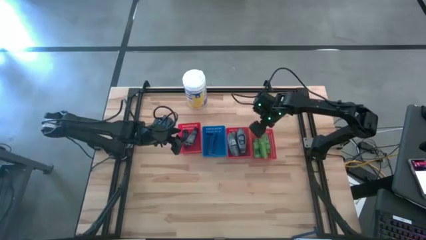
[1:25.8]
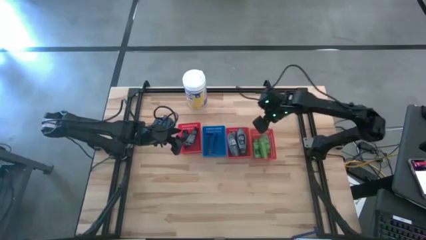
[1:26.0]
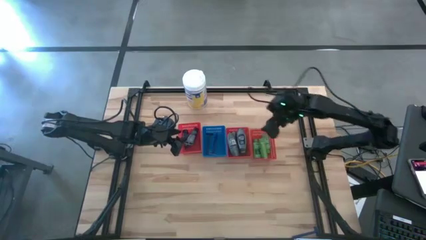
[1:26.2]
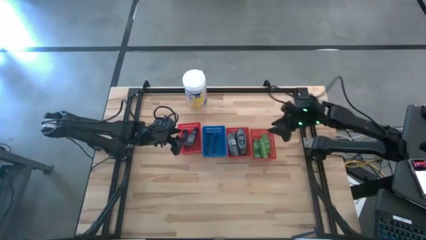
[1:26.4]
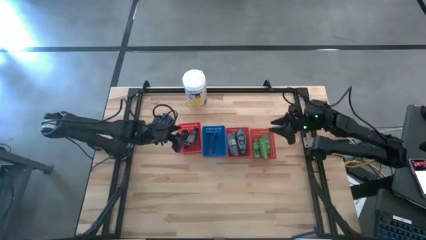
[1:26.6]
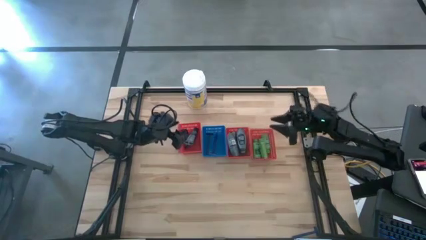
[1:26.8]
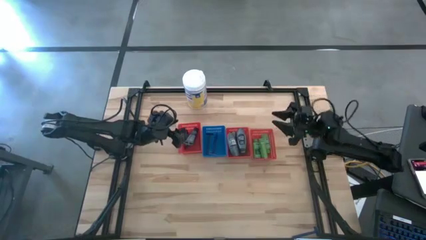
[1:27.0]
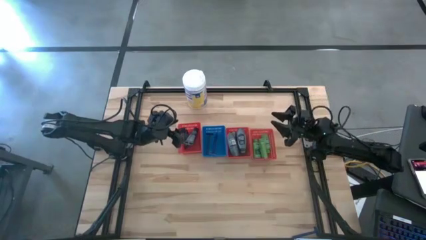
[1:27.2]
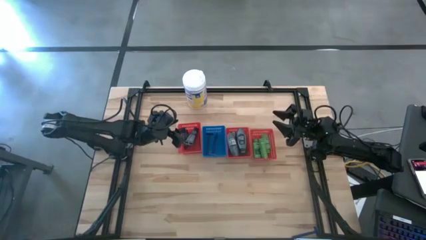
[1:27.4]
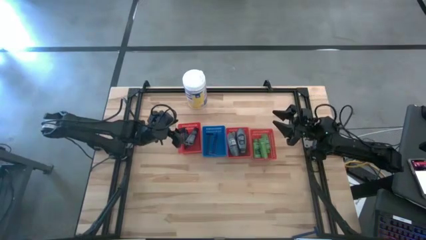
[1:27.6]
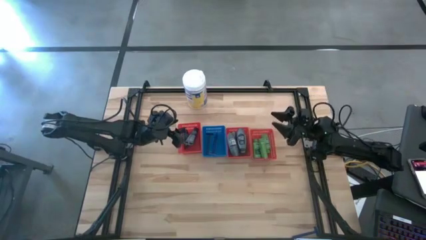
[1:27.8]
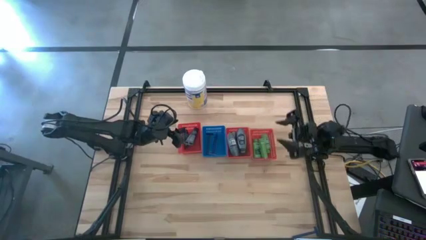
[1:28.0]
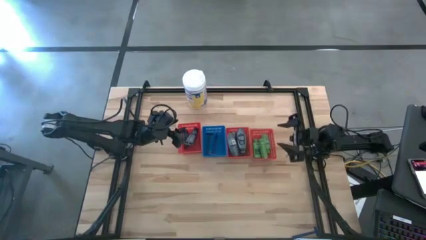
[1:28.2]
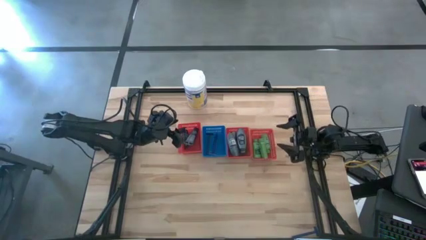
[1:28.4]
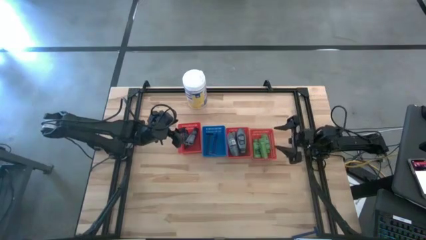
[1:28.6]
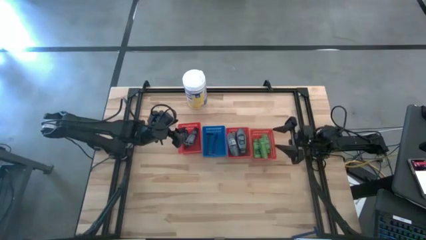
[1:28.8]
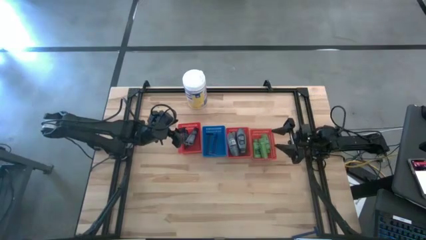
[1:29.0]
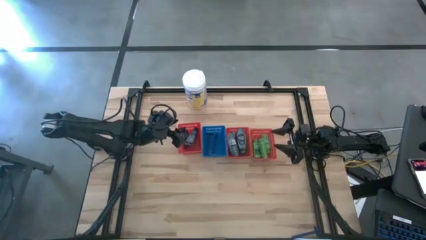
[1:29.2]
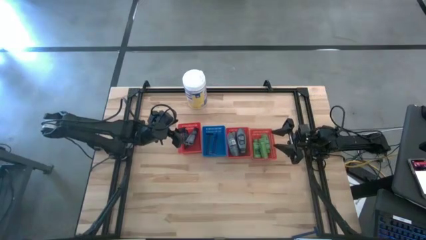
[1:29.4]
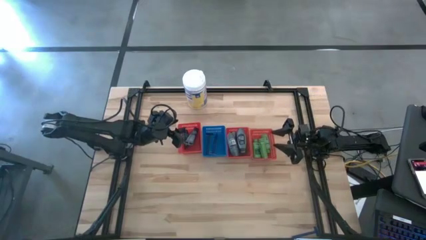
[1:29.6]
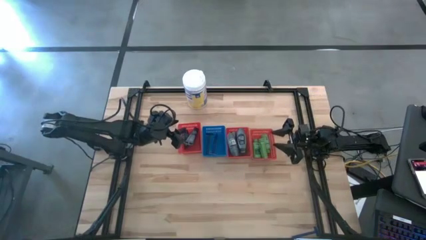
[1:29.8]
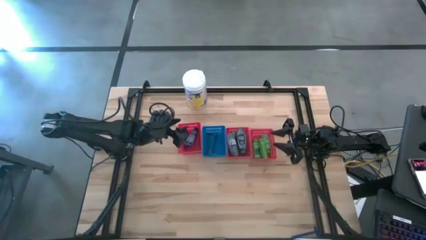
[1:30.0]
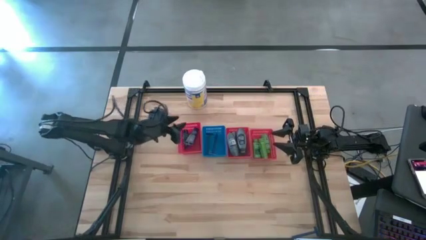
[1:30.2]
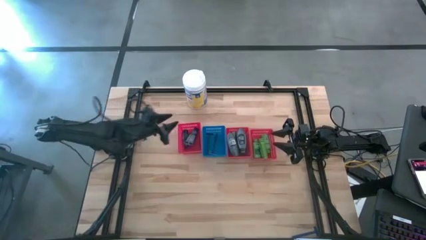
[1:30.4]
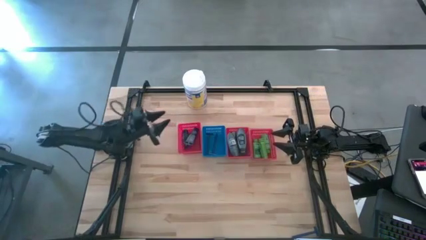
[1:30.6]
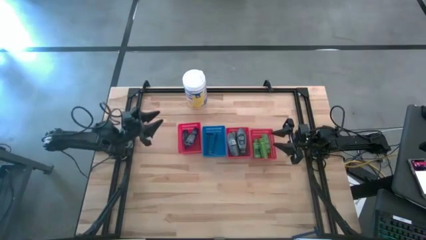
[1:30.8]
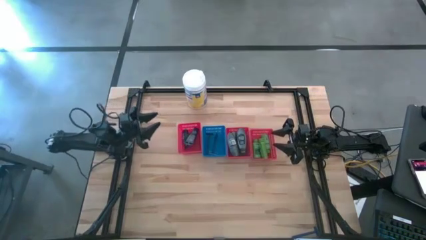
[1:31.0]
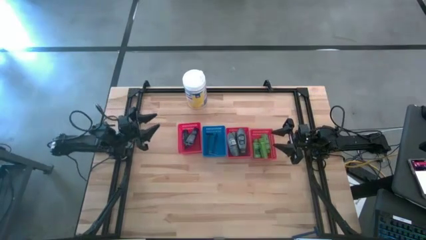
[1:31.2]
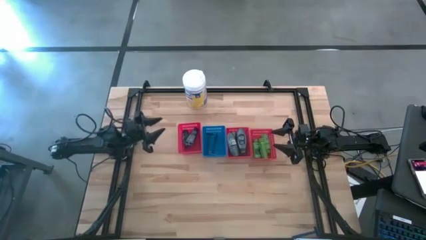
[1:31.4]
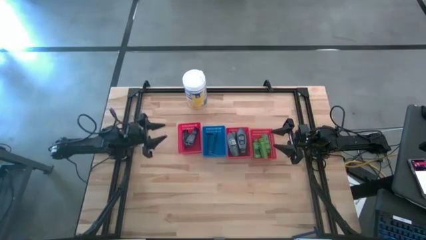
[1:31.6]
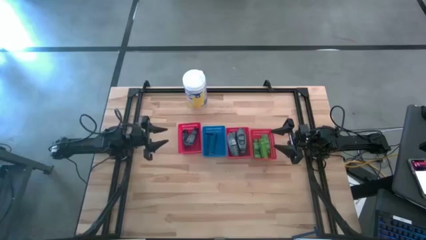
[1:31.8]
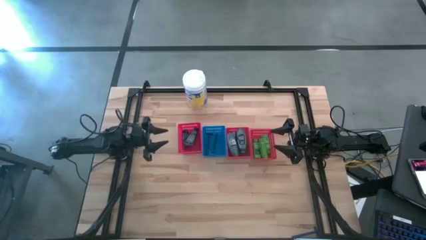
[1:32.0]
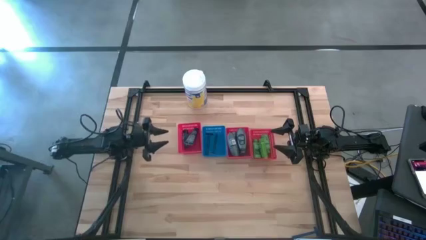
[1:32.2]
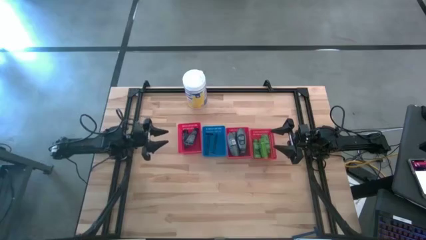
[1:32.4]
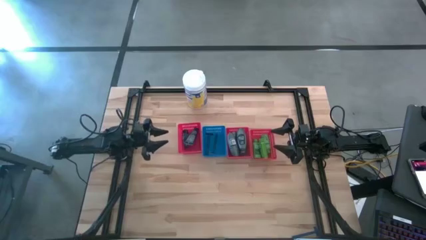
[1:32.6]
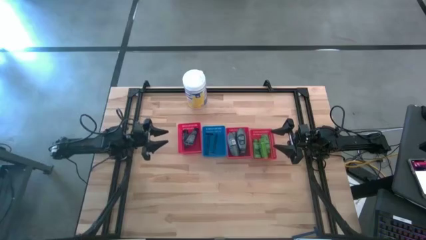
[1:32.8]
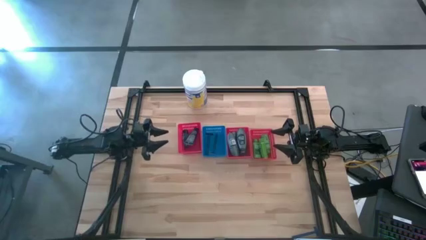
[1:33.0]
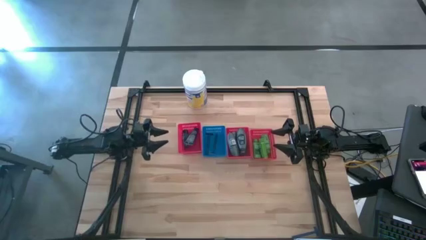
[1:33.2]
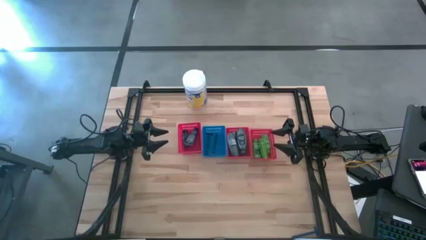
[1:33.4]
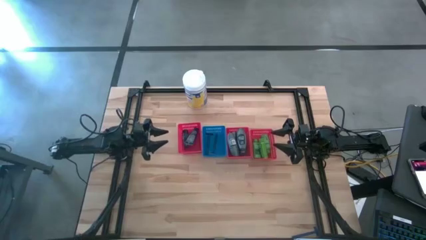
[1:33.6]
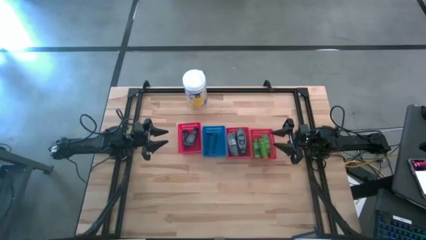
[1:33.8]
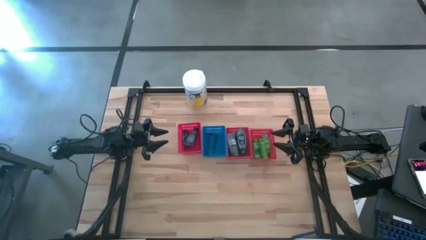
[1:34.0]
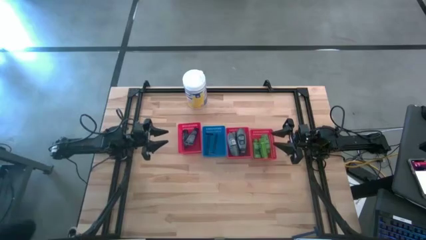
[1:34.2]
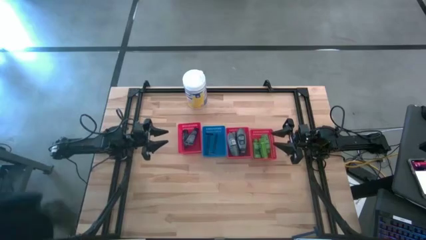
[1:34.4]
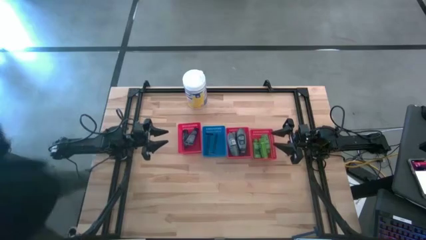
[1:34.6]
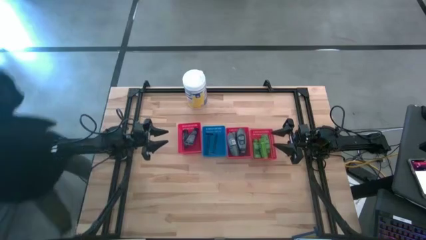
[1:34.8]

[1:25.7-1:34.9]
Task: Pick & Place Travel size toiletries
Return to Home Position

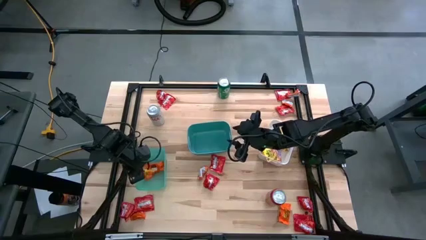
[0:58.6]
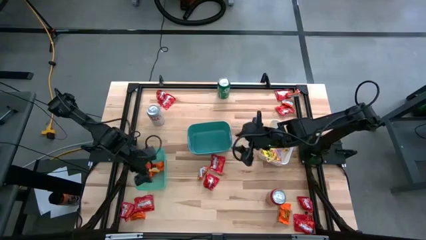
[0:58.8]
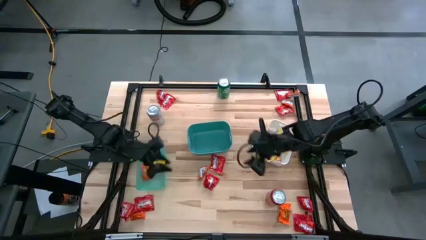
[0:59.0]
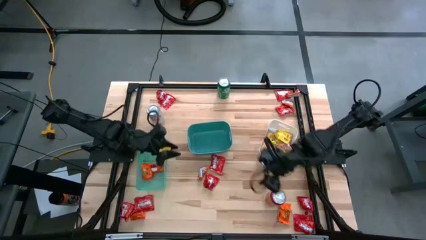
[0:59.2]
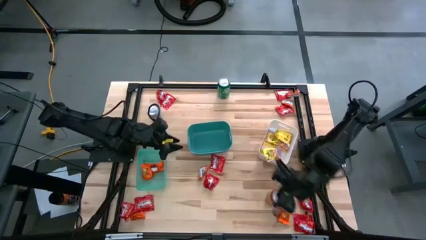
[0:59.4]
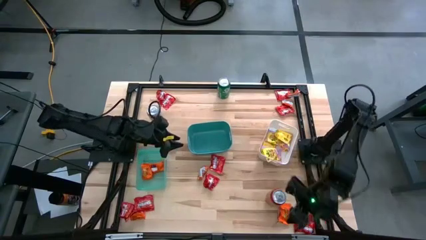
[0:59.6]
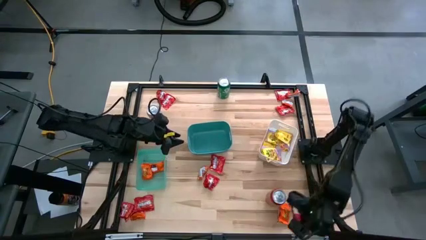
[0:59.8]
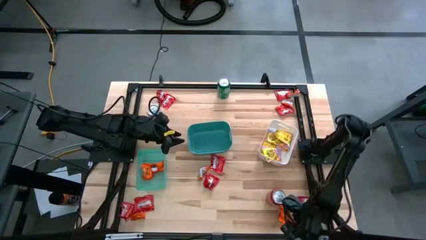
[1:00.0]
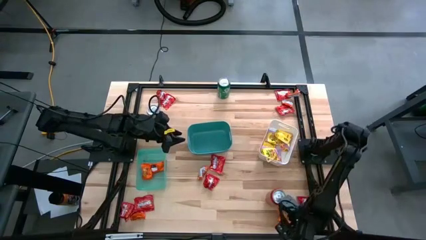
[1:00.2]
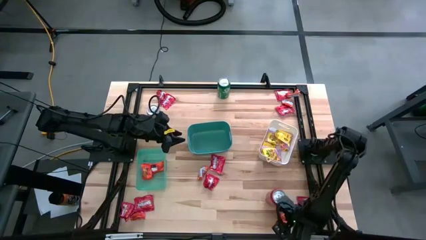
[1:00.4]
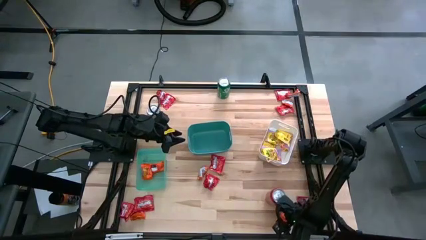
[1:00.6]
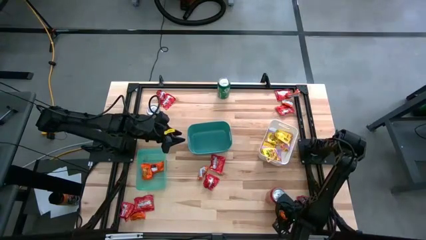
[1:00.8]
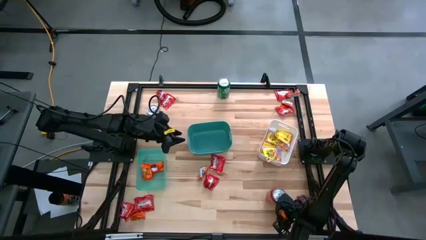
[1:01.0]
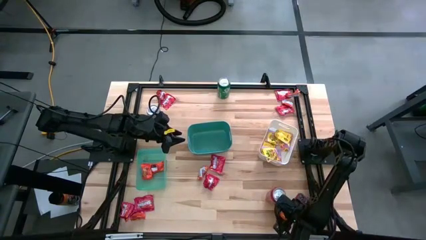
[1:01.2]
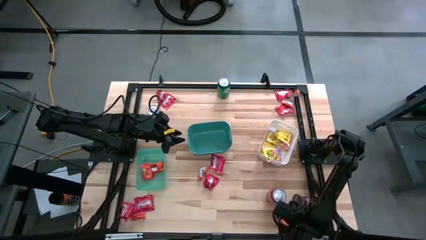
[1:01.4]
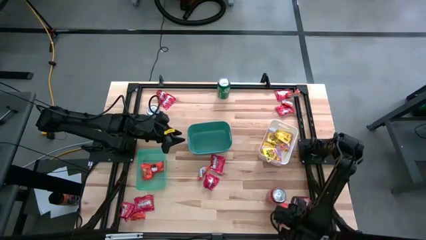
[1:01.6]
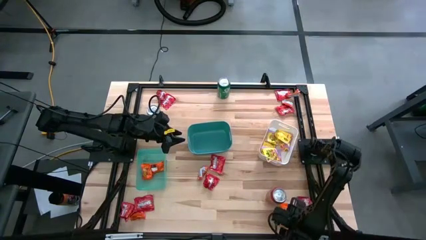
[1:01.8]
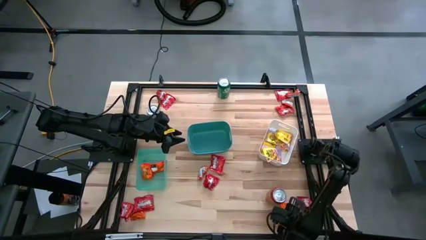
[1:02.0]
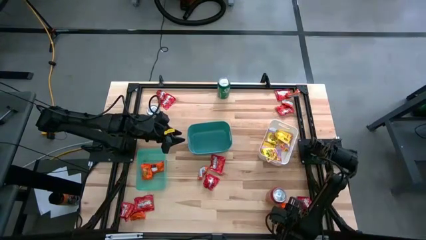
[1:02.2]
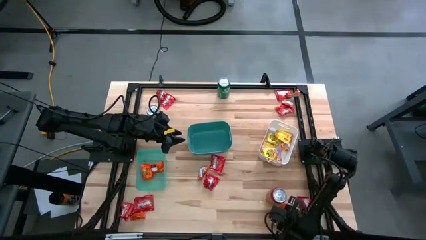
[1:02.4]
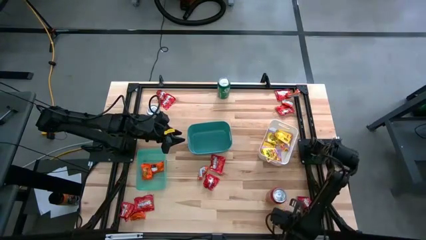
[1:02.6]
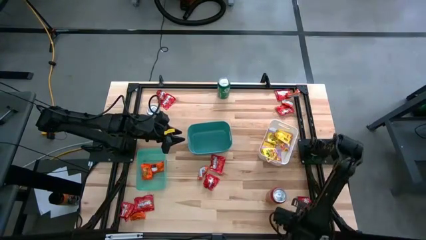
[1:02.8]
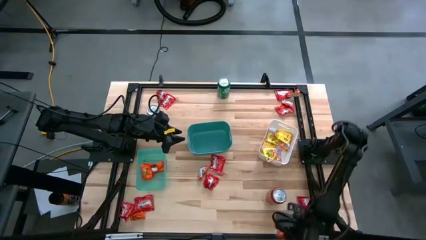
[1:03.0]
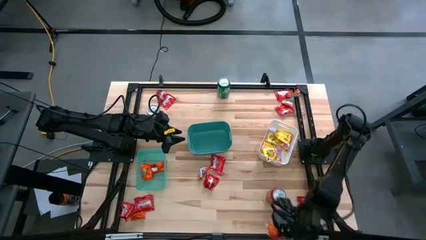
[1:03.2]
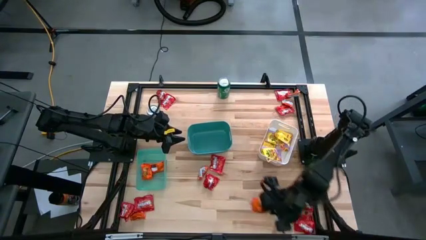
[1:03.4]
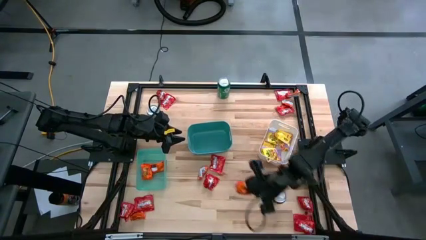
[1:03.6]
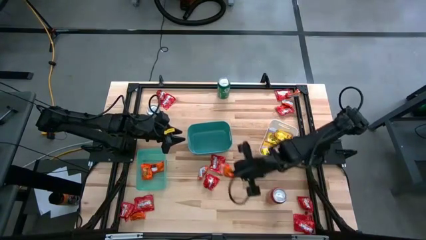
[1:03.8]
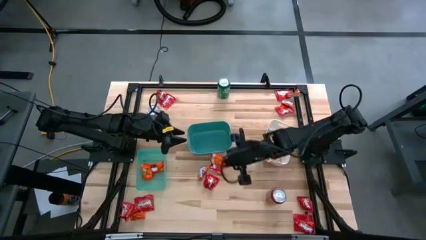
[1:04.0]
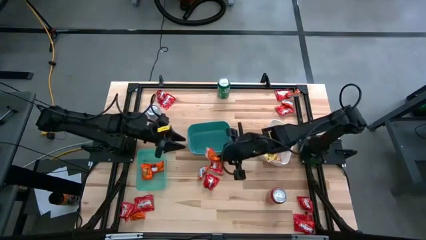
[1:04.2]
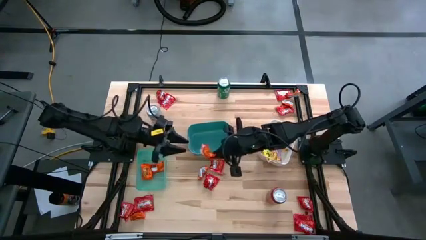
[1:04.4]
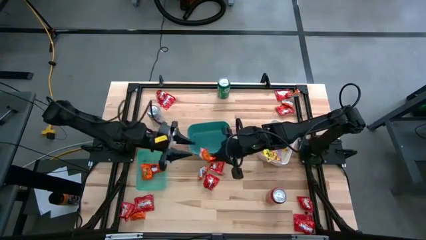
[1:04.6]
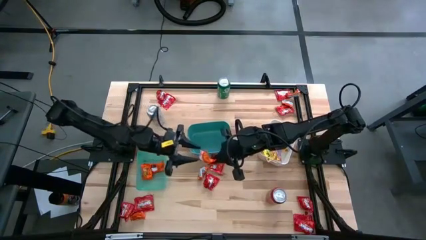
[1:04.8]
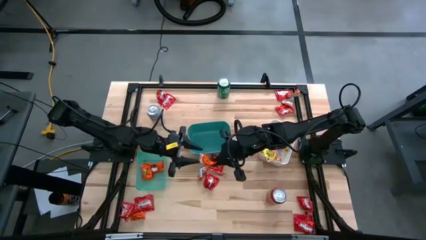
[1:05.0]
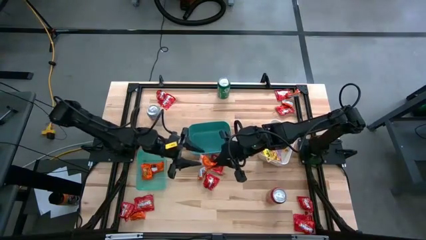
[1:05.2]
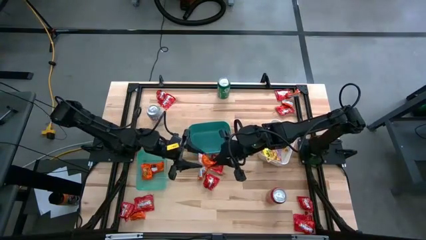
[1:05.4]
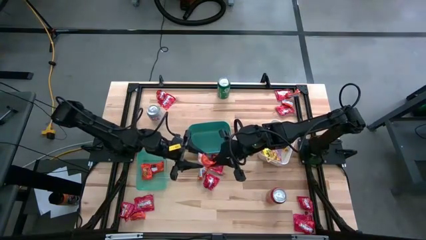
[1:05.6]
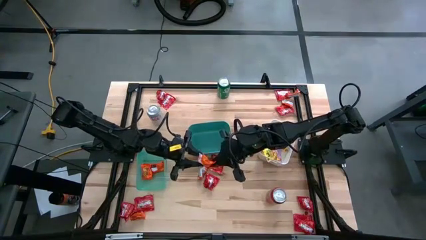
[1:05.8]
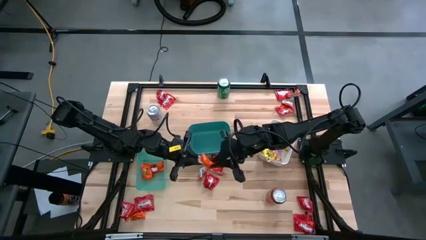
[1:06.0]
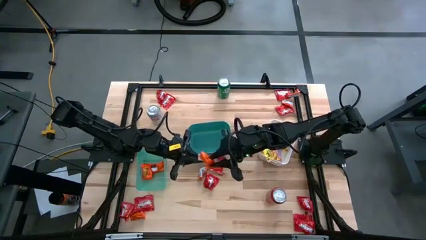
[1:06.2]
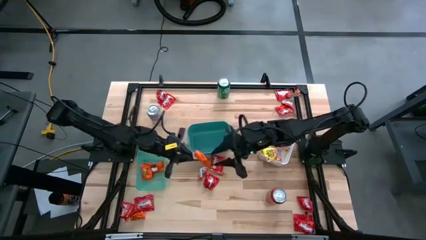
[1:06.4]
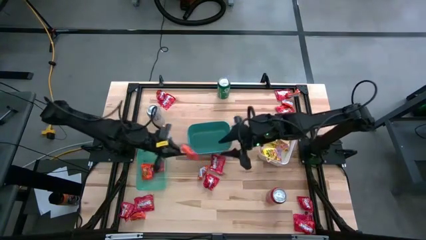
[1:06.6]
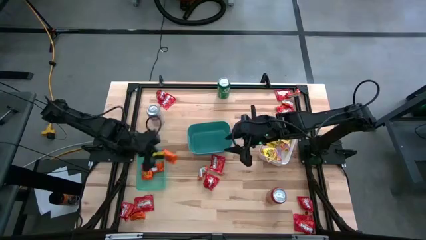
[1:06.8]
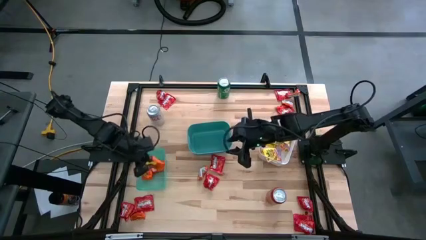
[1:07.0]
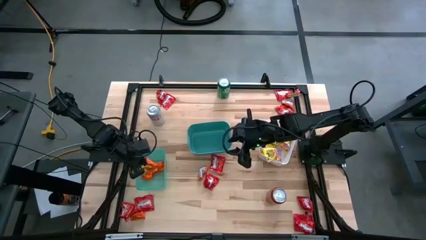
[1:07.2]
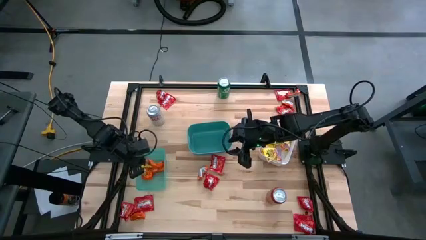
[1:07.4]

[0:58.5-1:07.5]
Task: Sort candy
Put the orange chocolate into the light green bin
